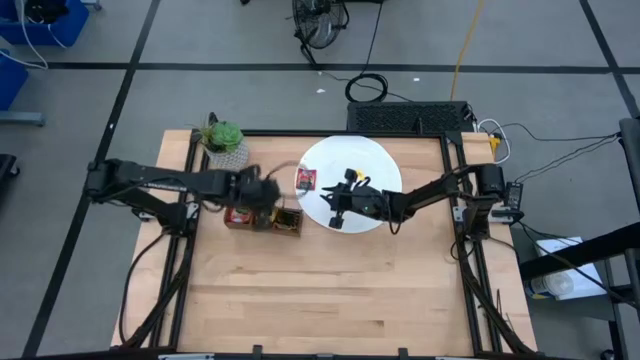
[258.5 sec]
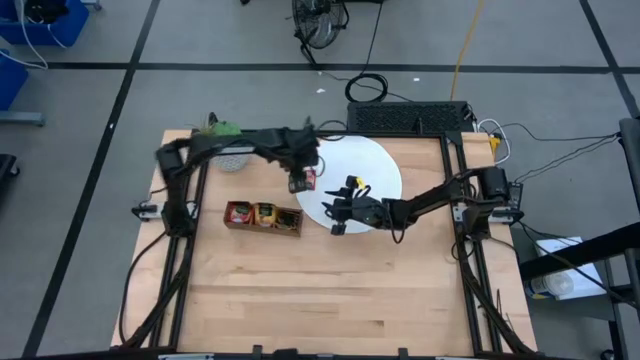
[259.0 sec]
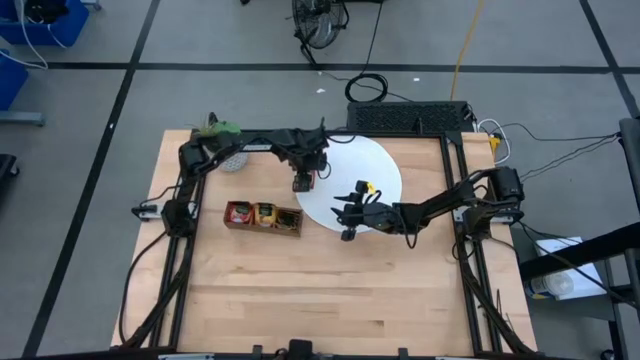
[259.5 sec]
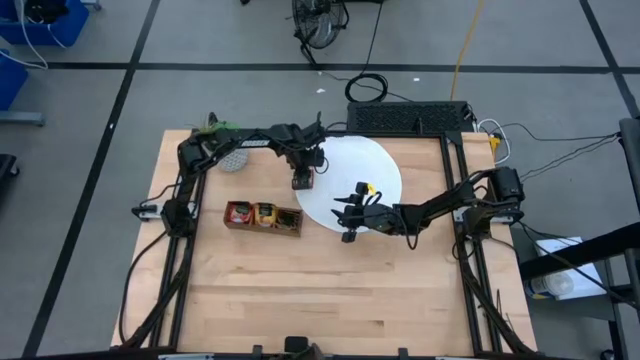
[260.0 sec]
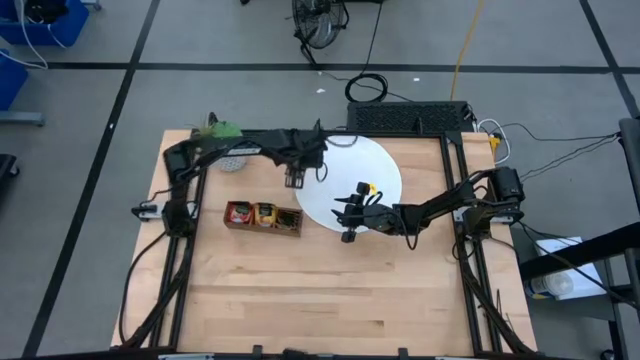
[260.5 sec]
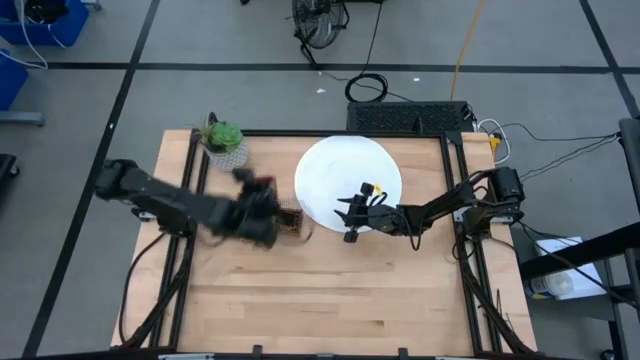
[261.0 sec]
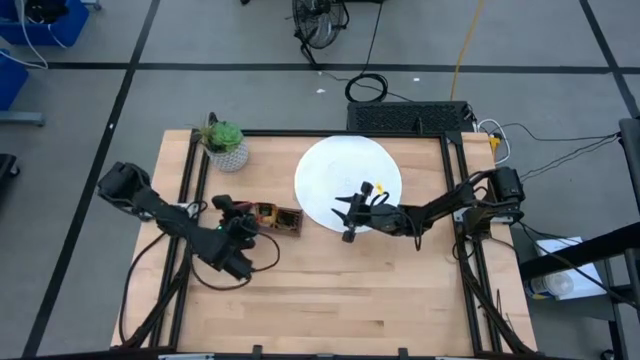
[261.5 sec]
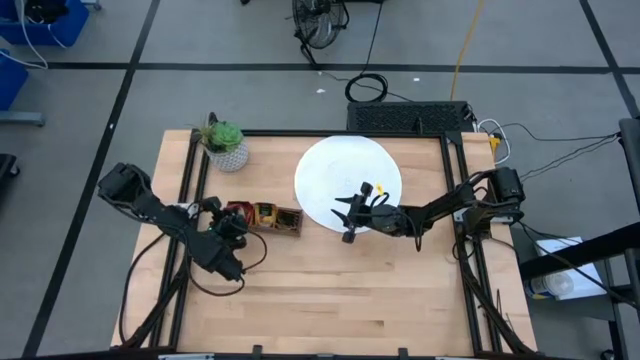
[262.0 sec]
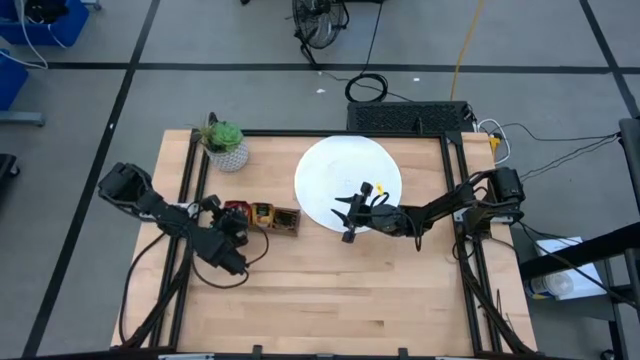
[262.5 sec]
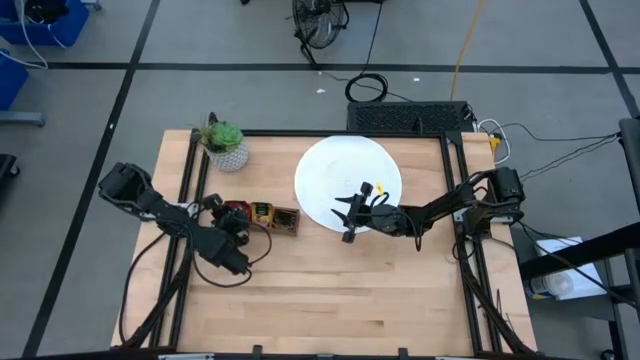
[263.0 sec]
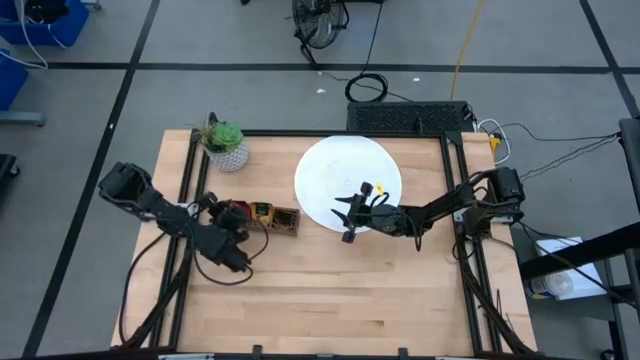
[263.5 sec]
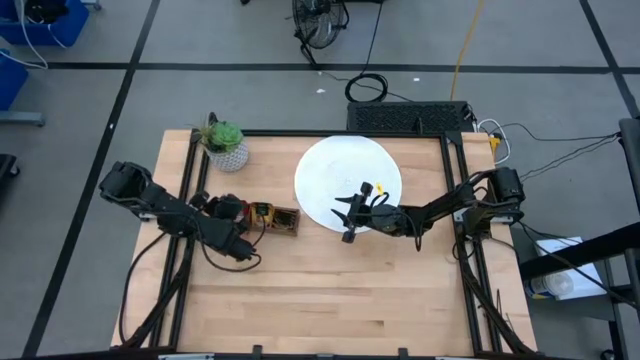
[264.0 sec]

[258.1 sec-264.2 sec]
Task: Pick & Place Tea
Put the red tea bag into the left section of the wooden organizer

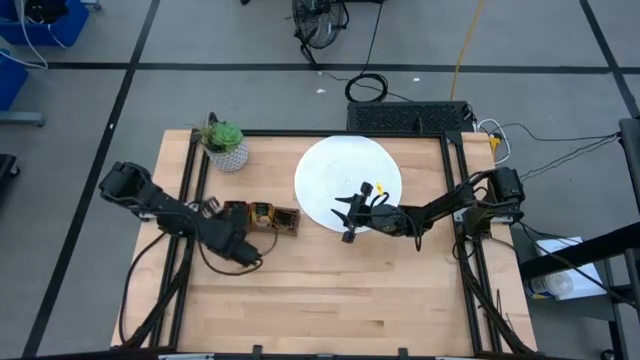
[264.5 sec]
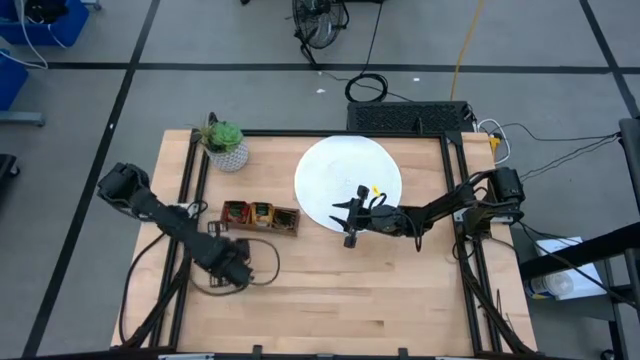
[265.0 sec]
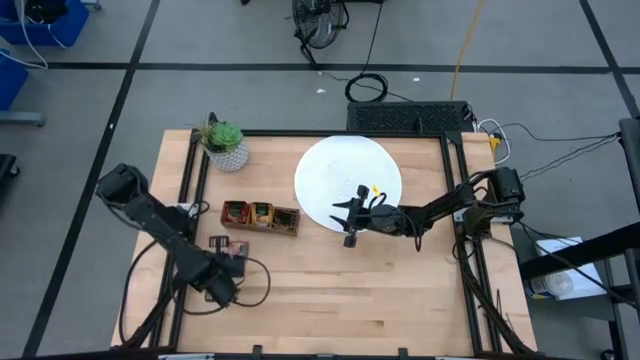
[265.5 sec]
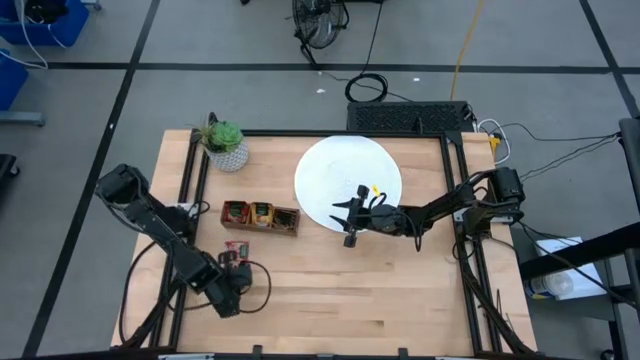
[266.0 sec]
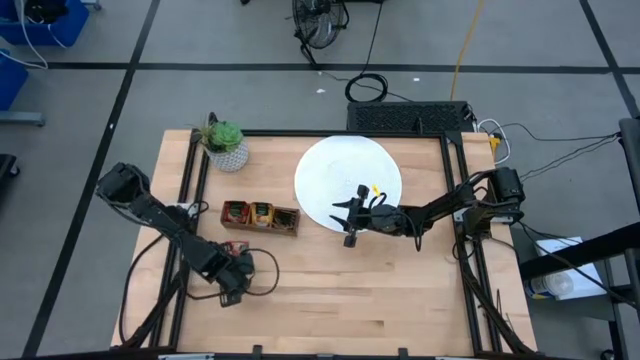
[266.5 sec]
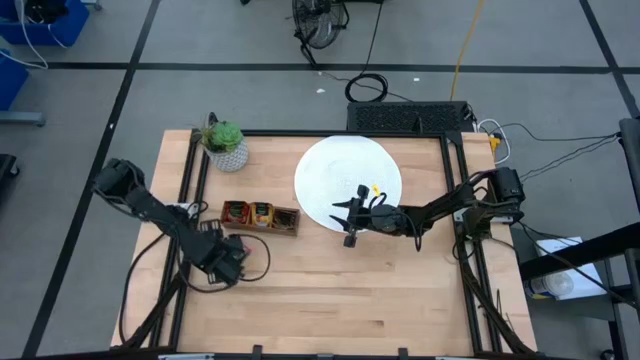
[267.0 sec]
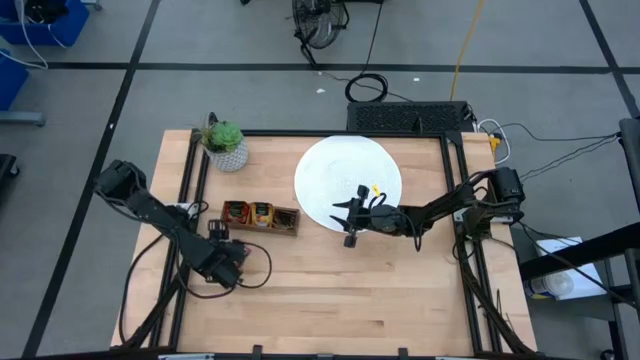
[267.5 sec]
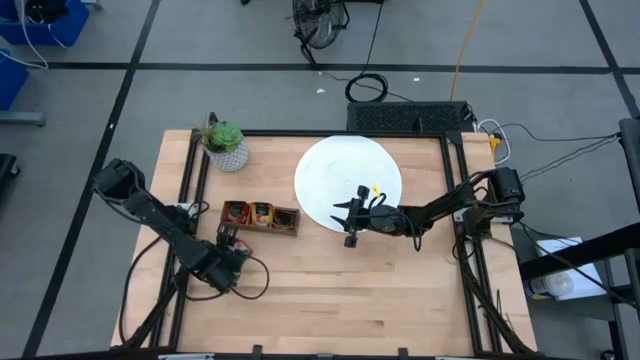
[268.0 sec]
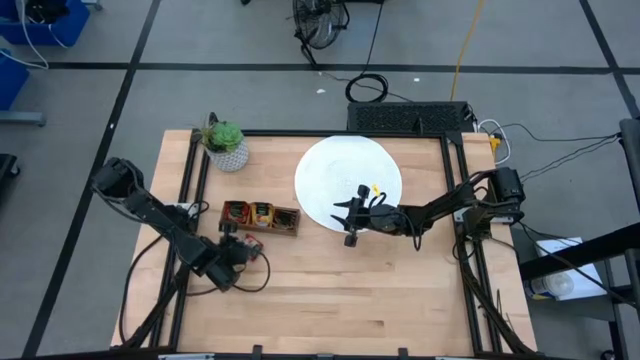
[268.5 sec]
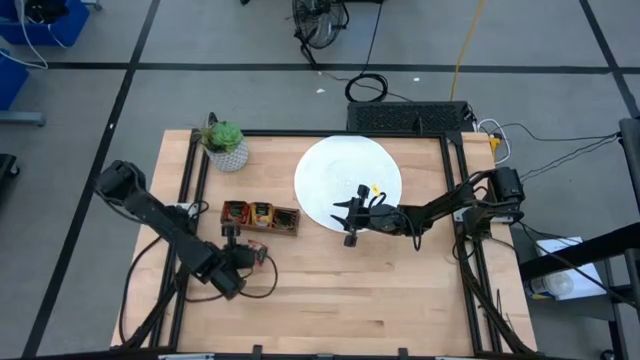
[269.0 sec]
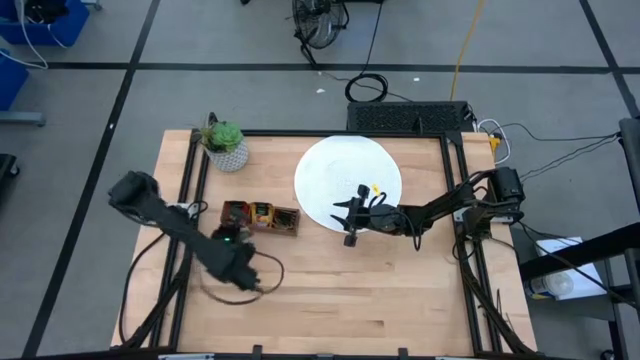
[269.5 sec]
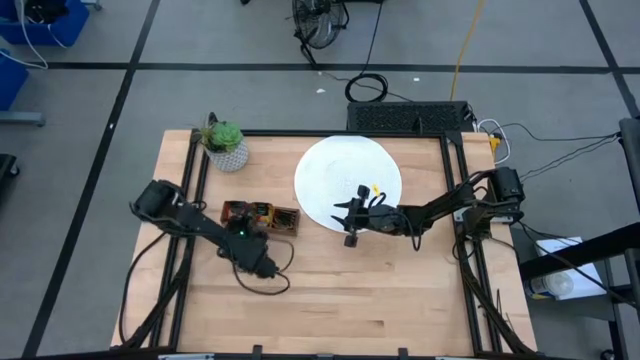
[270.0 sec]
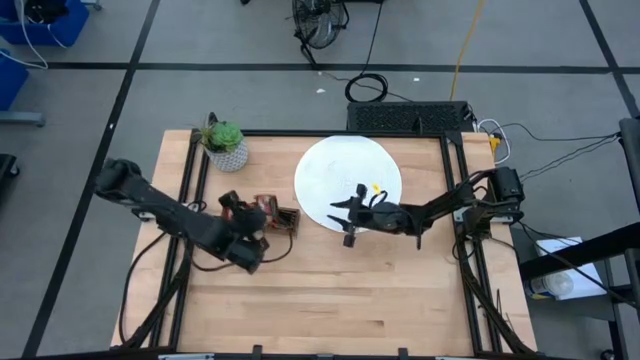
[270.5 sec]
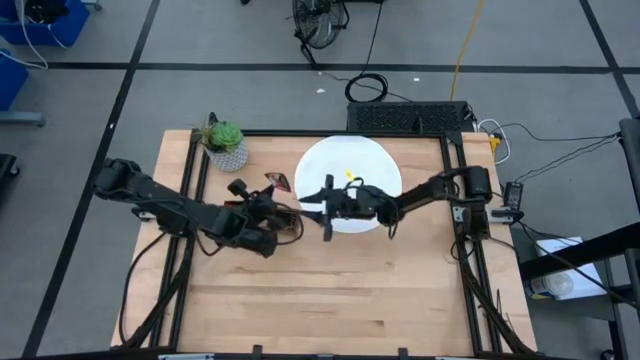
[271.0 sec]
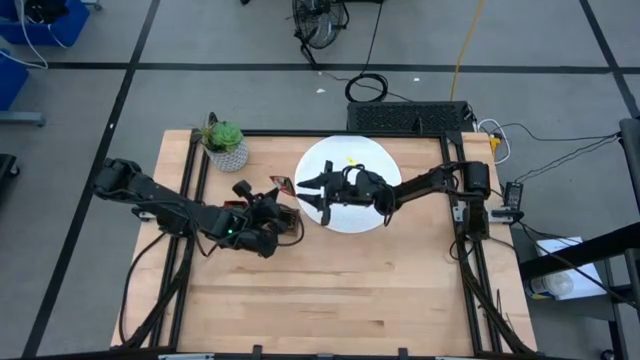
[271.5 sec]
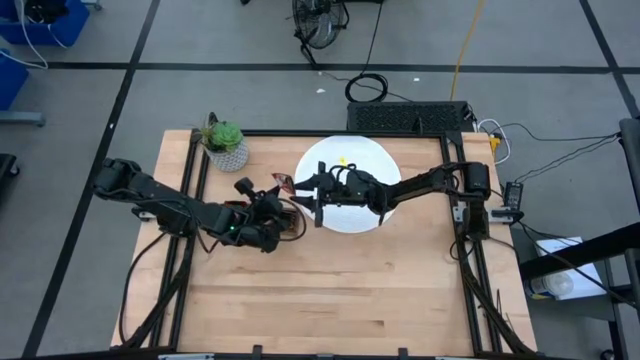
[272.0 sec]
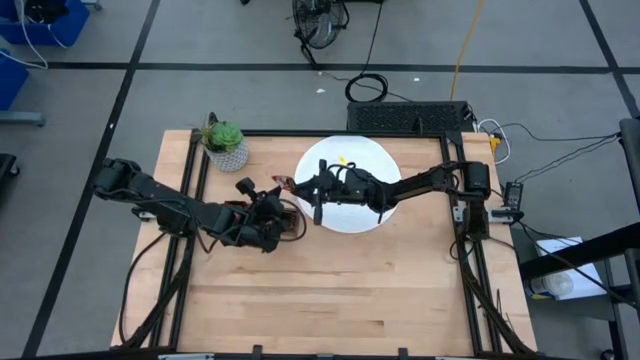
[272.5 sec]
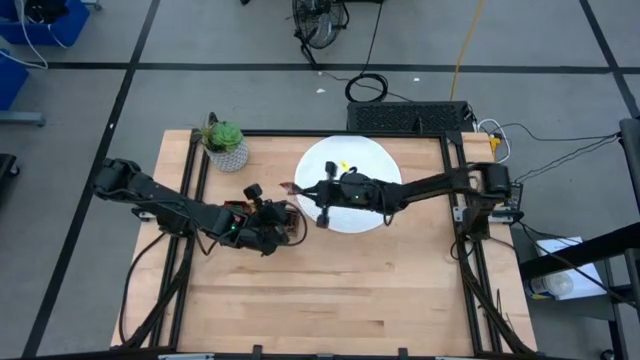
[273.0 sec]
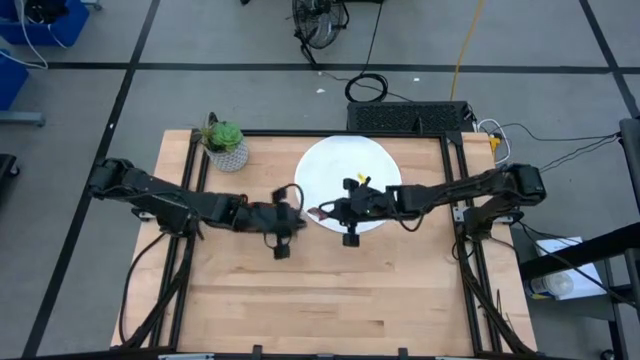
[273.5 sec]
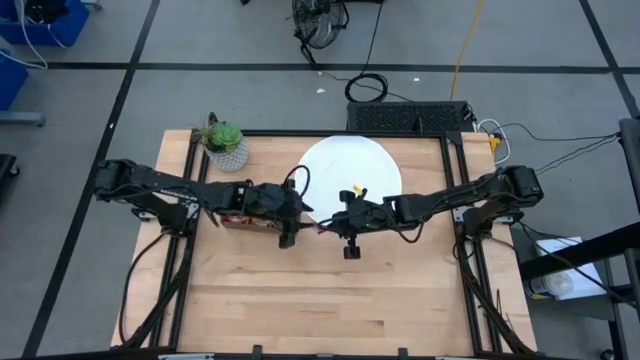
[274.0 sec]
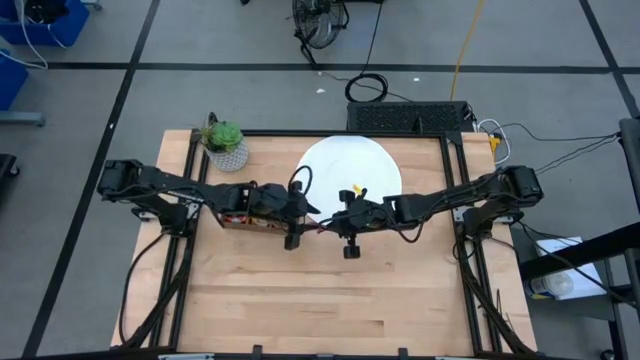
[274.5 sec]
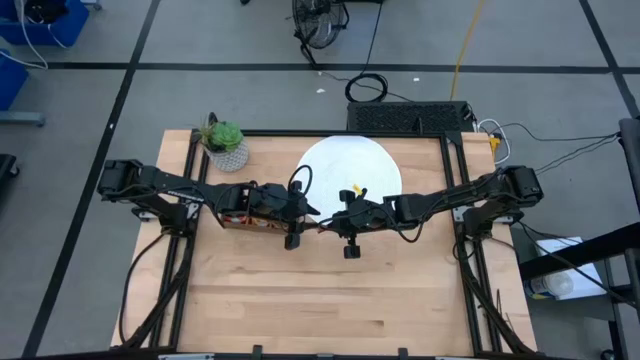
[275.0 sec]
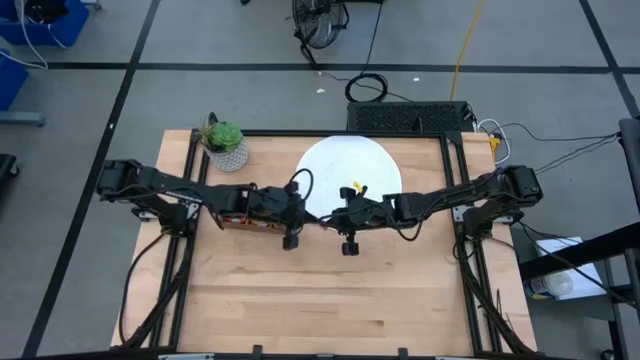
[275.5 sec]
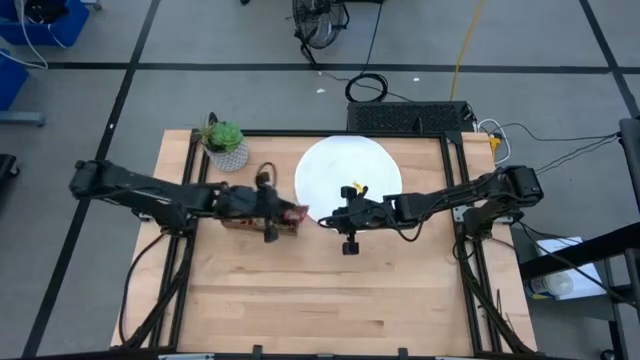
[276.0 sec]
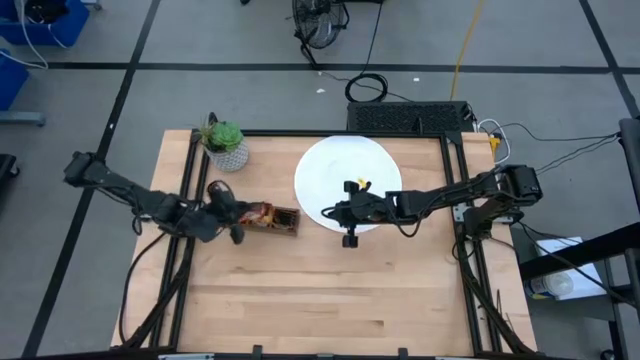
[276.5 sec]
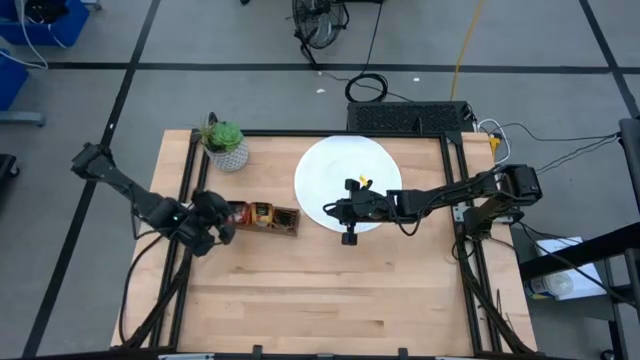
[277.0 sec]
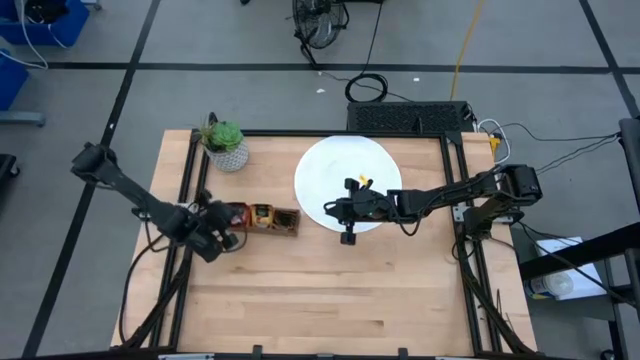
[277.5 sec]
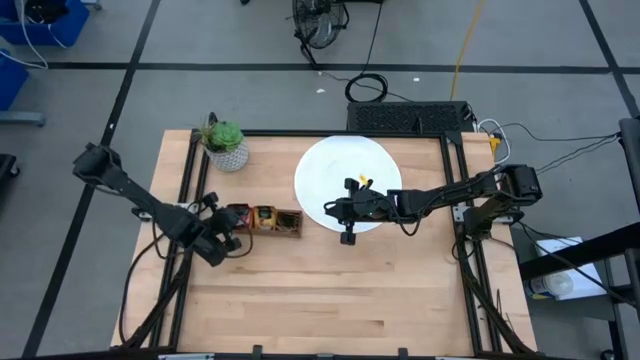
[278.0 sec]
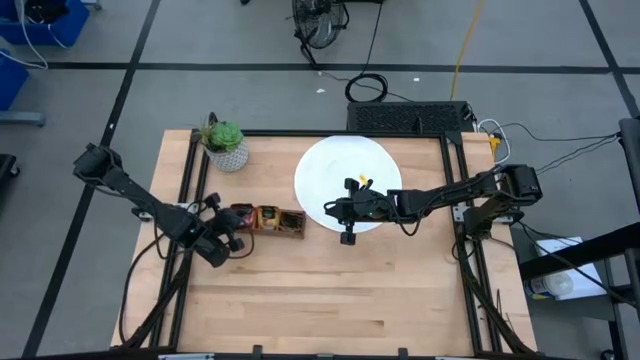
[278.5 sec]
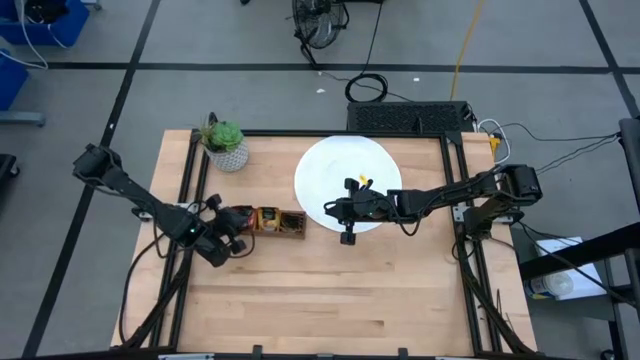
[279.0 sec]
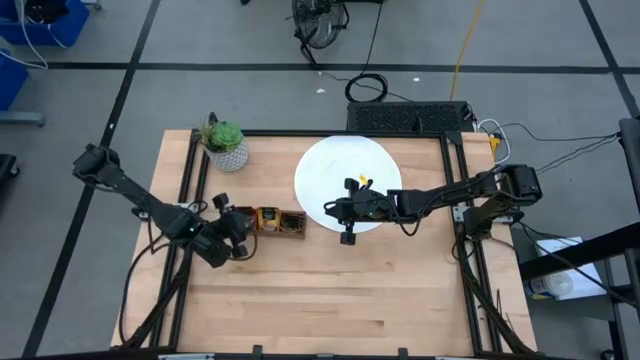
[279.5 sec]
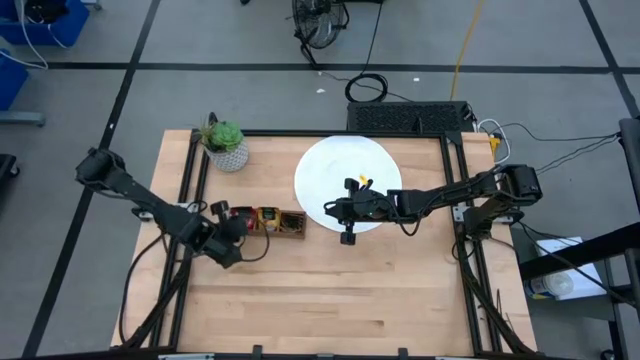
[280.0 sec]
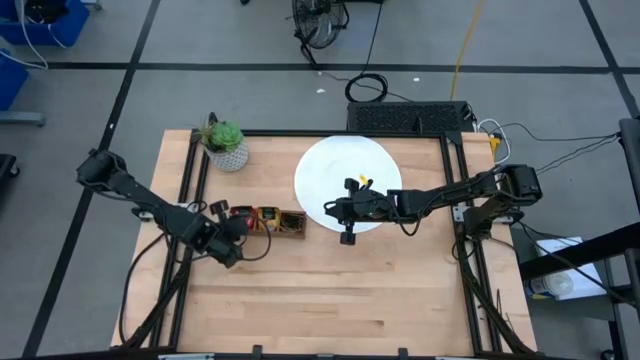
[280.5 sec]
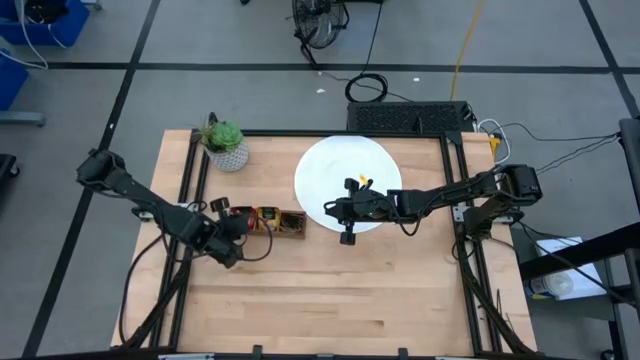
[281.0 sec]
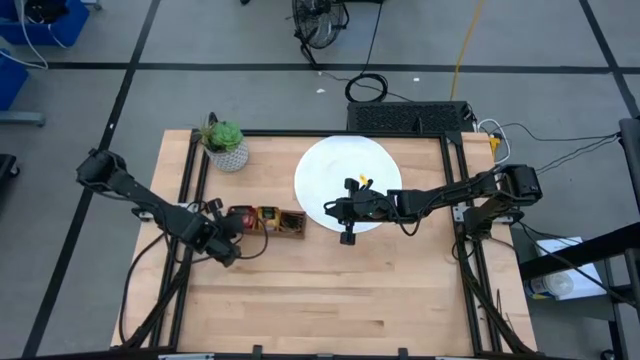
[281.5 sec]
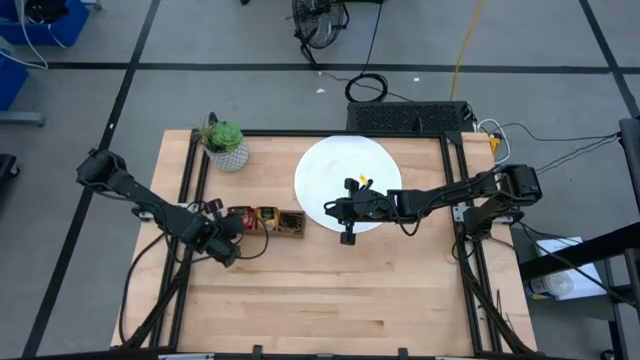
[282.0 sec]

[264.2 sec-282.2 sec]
Put the red tea bag into the left section of the wooden organizer
